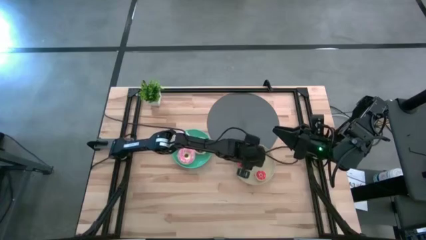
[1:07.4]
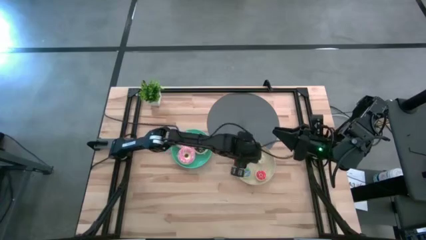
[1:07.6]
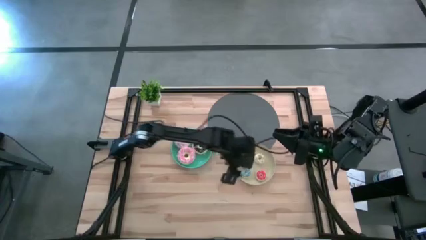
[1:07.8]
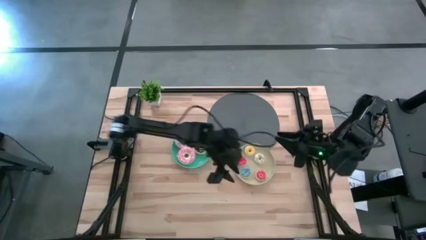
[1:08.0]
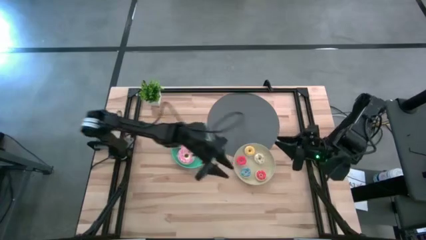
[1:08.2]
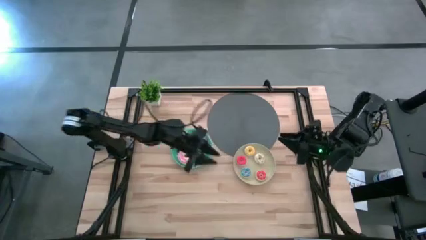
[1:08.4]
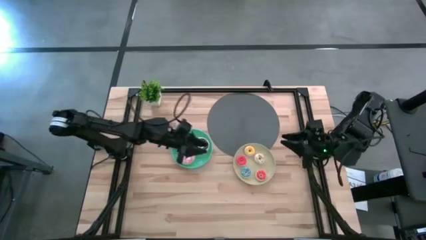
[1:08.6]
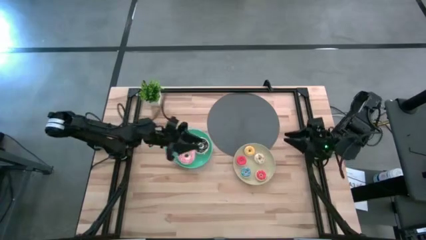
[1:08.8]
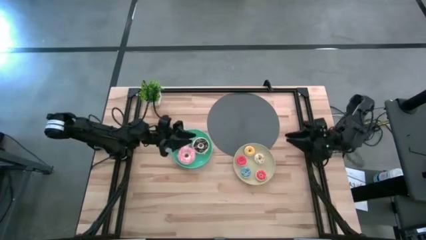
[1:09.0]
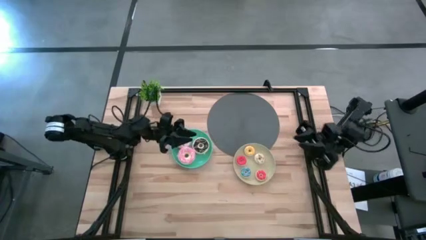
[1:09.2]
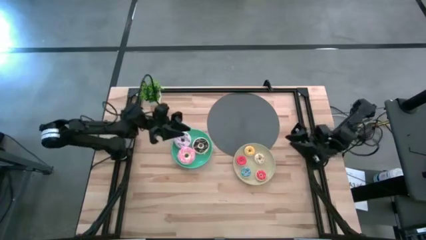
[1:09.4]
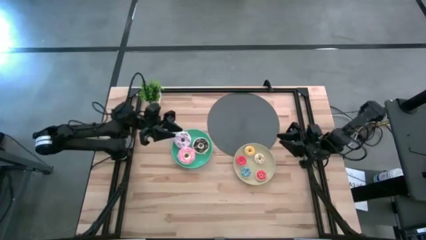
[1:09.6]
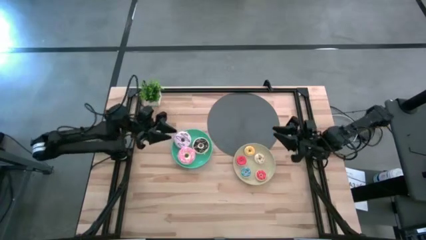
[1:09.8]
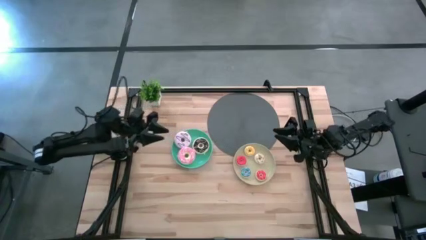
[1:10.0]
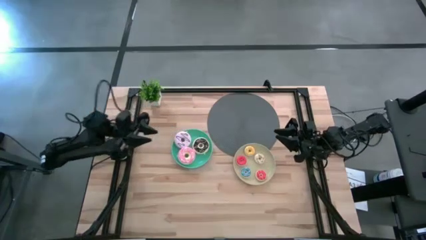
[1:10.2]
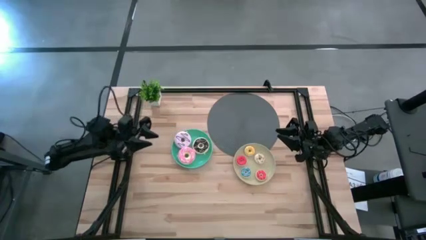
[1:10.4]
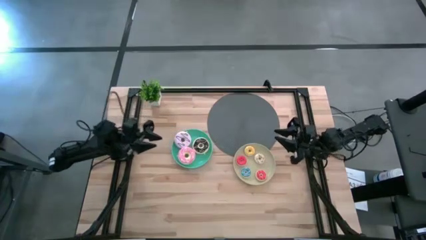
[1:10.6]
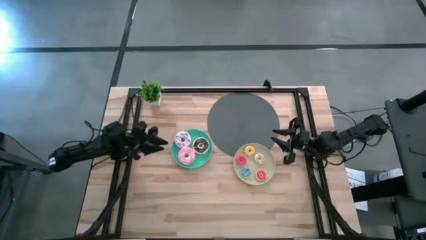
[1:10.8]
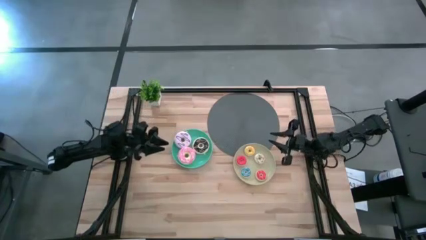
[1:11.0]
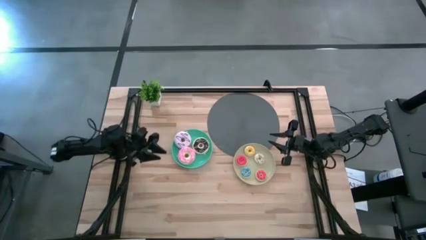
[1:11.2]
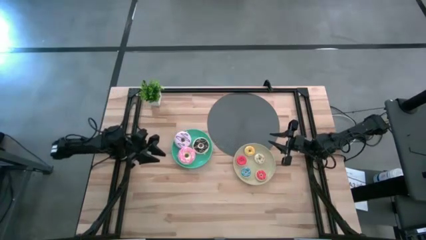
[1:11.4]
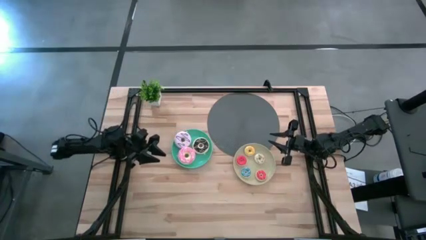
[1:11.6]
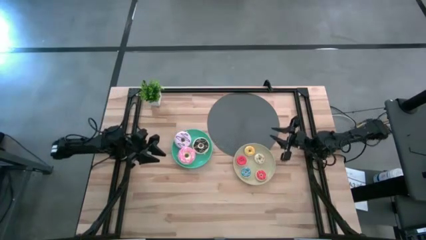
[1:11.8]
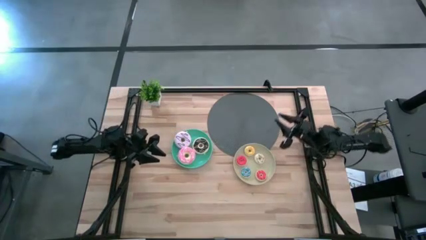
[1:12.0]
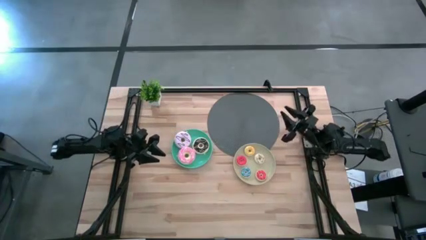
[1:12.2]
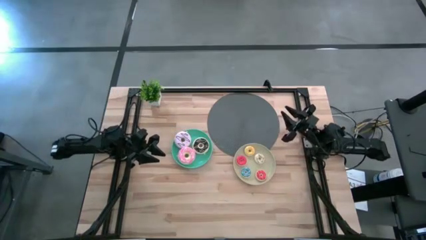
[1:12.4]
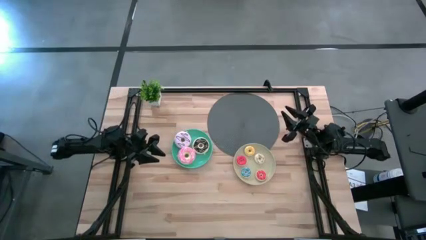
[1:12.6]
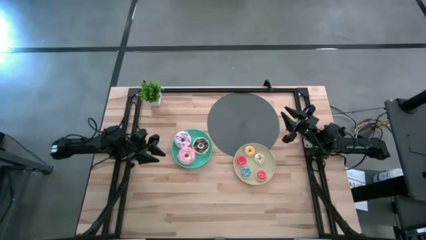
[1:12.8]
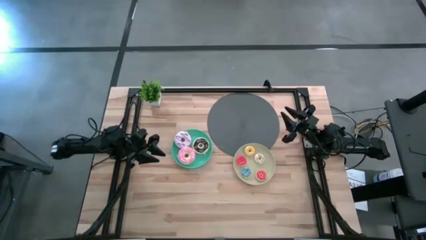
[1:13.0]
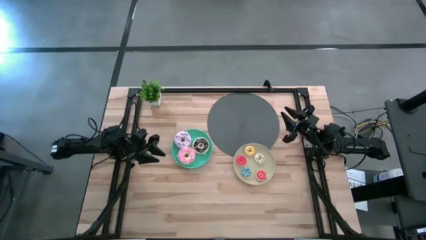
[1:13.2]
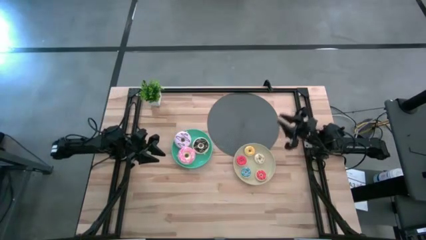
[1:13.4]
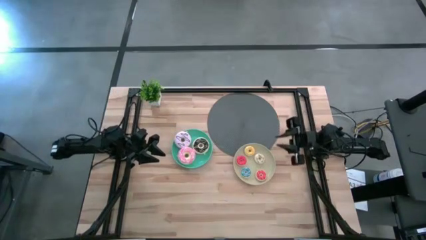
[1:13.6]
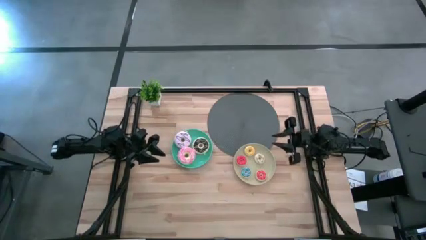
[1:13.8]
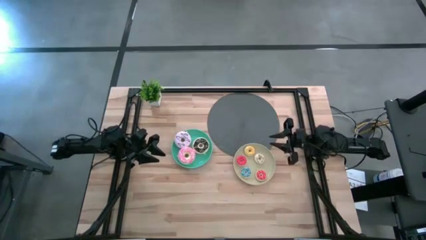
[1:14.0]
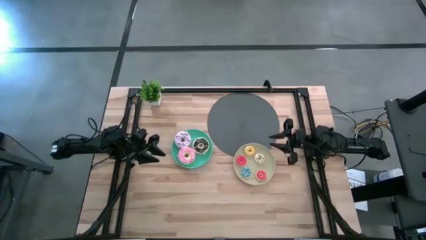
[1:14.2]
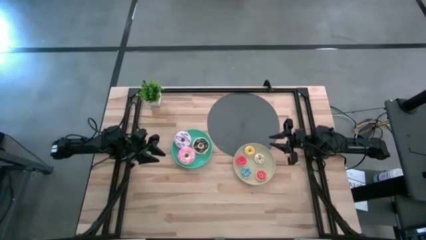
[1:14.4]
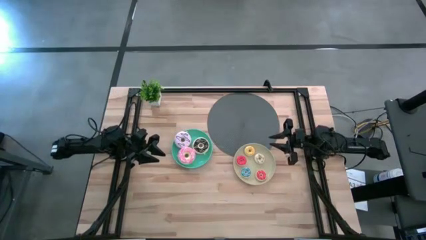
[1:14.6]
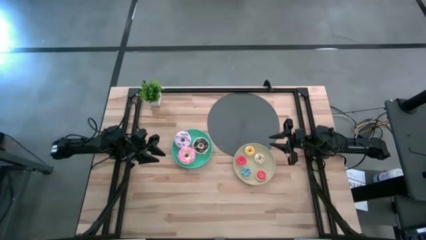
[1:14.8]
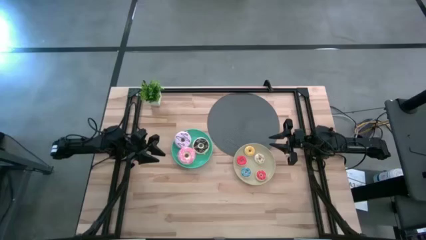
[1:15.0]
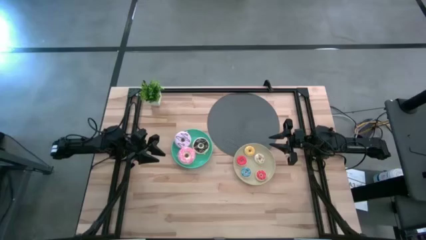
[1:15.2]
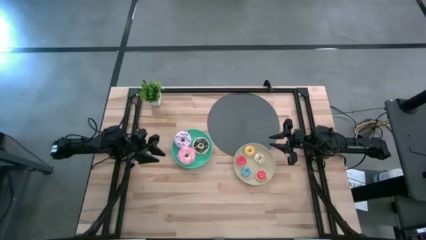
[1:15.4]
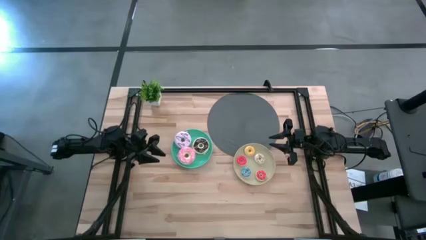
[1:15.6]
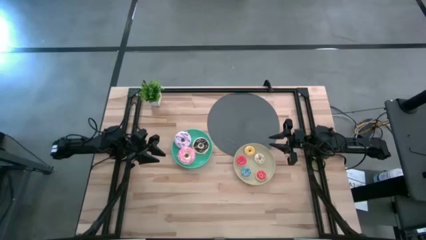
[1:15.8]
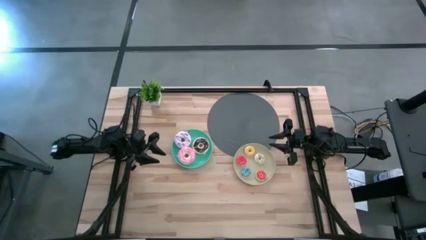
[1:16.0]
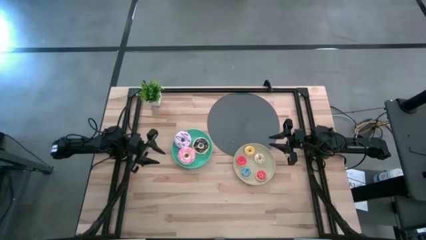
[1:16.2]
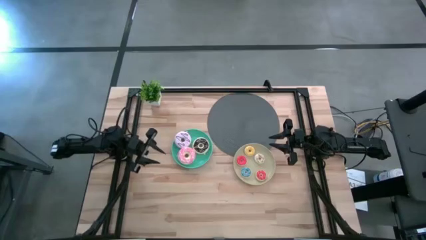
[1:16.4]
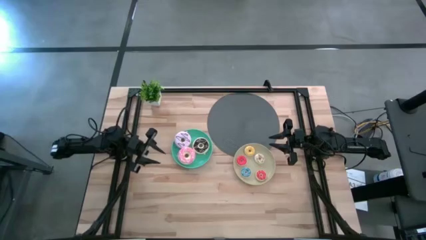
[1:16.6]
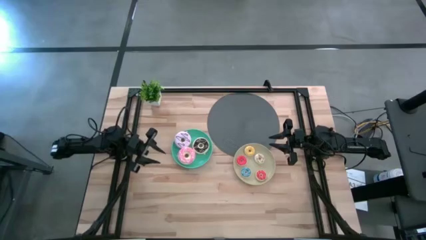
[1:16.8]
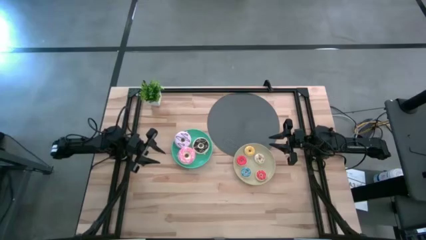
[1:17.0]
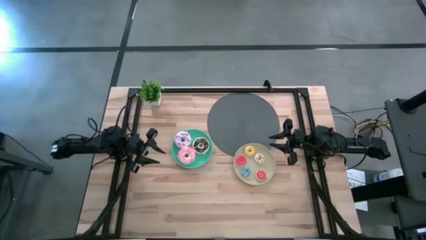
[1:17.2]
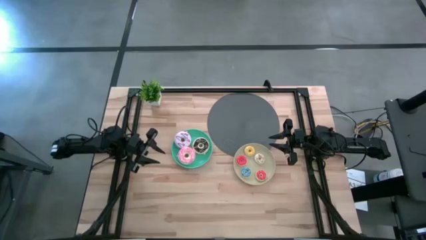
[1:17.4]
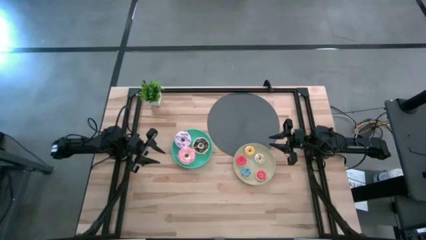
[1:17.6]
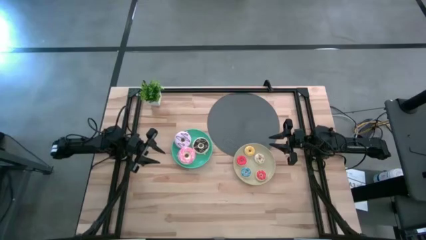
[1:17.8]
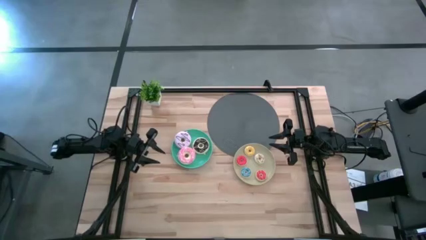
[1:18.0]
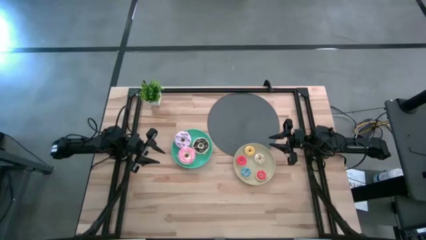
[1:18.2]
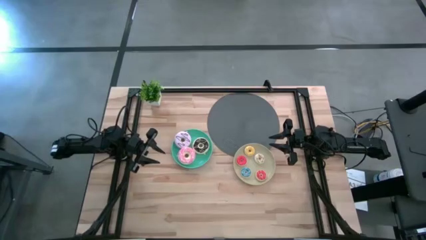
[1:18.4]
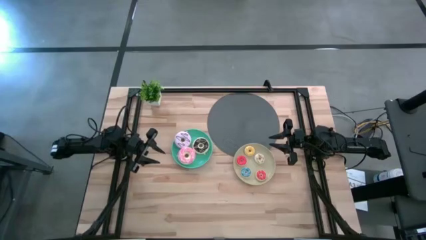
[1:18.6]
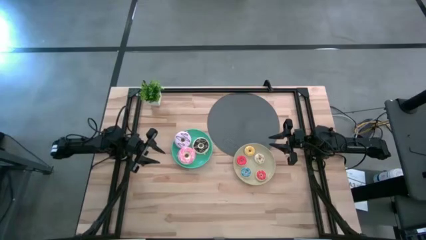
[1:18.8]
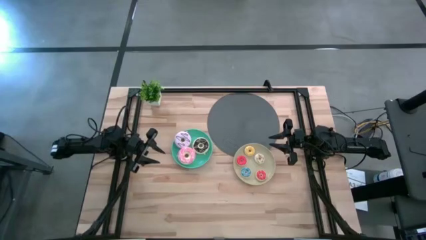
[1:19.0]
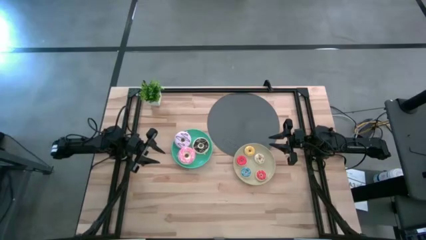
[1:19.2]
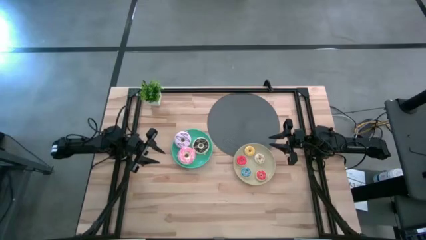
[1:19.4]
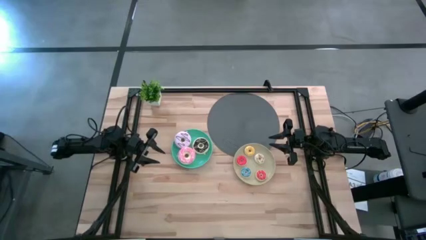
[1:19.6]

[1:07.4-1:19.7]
Task: Pick & Place donuts
Return to Home Position

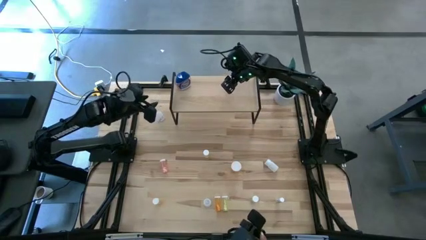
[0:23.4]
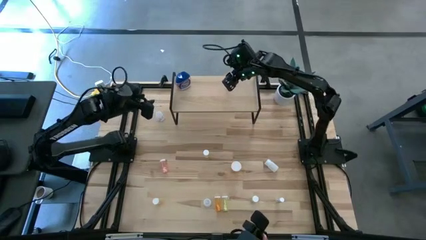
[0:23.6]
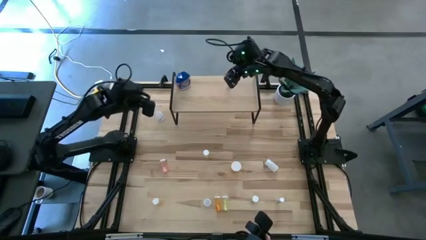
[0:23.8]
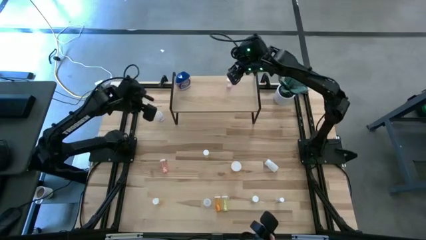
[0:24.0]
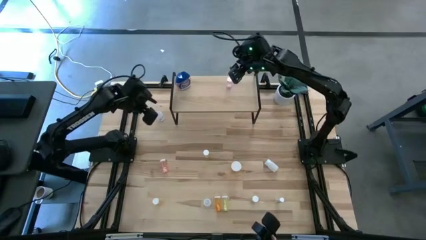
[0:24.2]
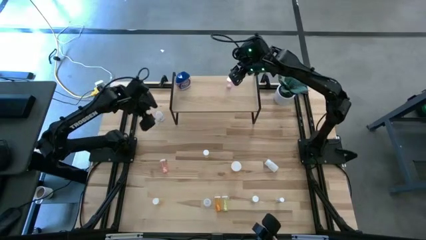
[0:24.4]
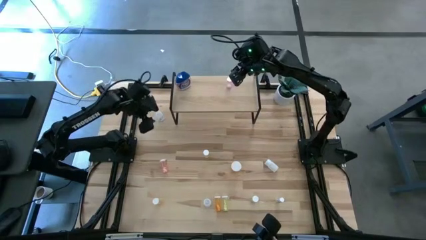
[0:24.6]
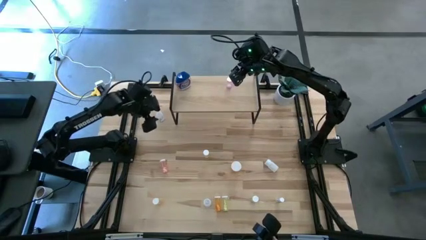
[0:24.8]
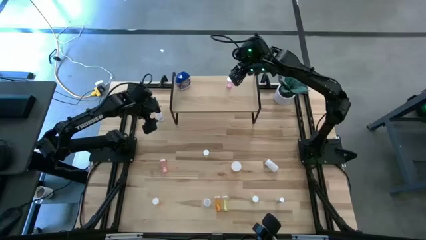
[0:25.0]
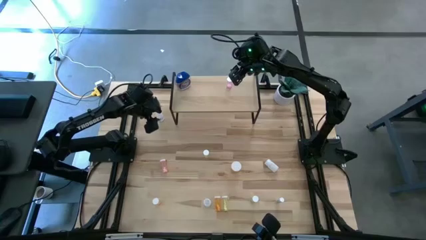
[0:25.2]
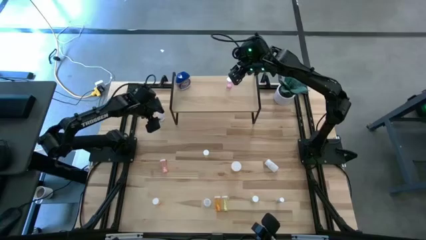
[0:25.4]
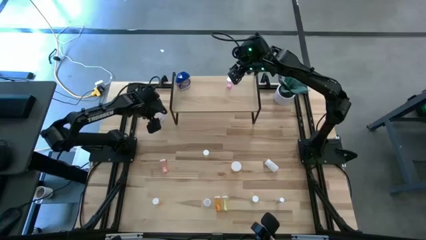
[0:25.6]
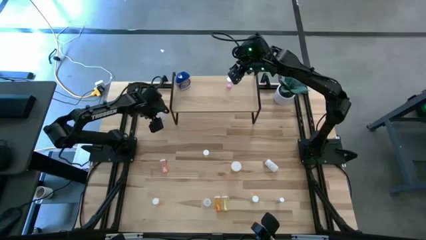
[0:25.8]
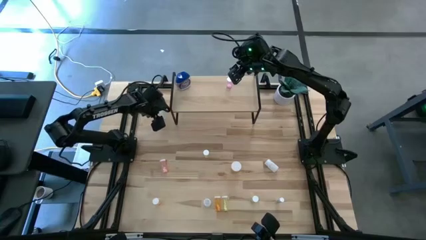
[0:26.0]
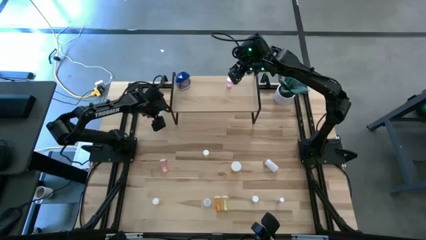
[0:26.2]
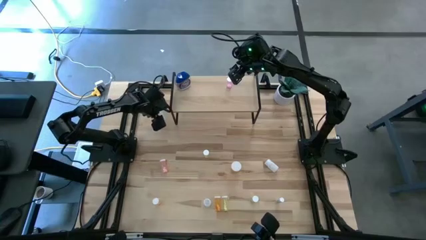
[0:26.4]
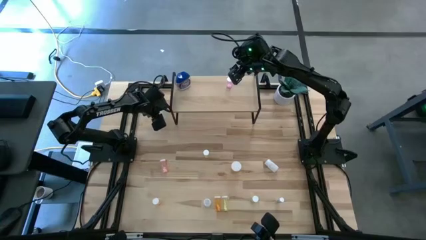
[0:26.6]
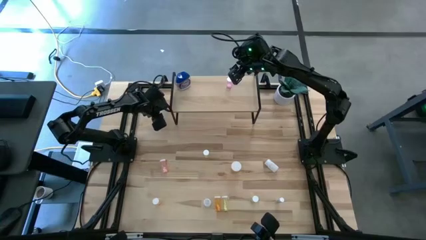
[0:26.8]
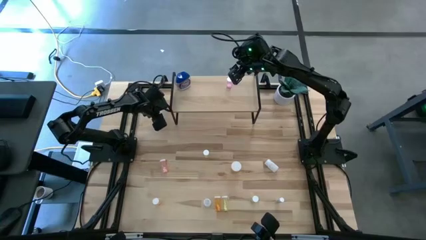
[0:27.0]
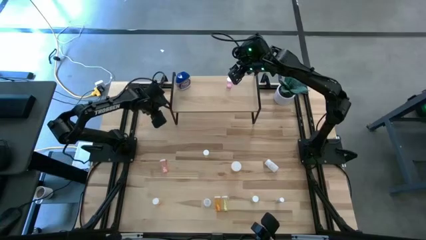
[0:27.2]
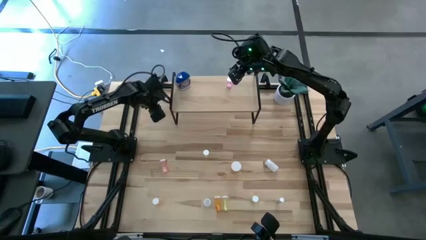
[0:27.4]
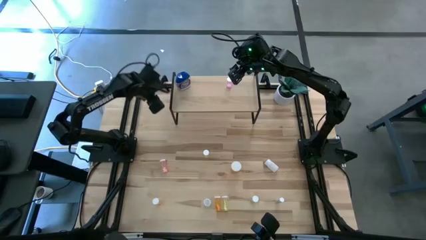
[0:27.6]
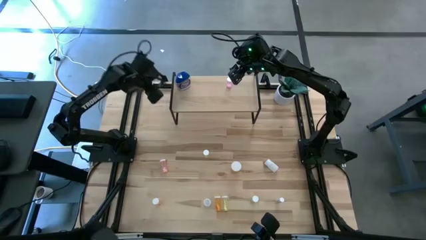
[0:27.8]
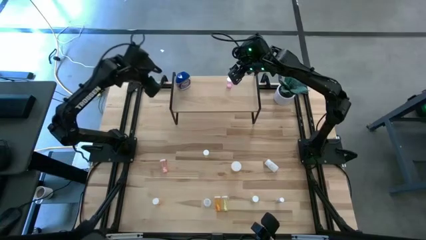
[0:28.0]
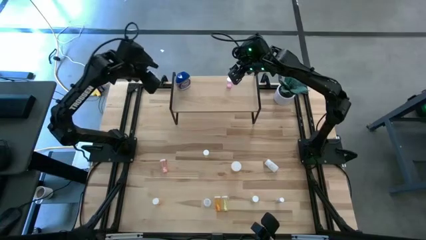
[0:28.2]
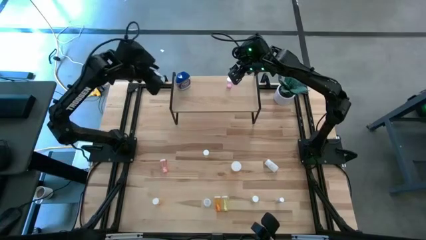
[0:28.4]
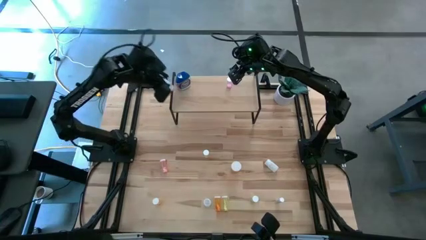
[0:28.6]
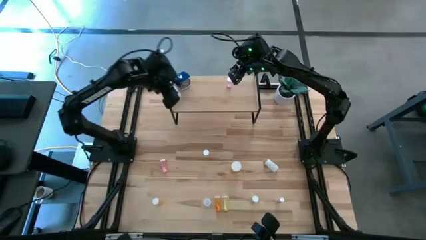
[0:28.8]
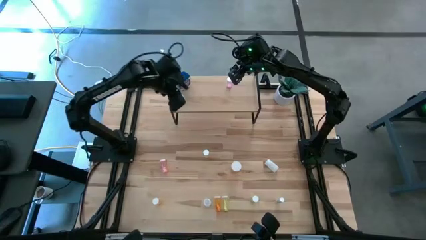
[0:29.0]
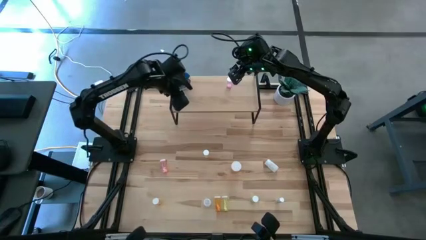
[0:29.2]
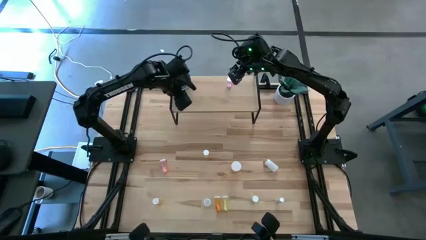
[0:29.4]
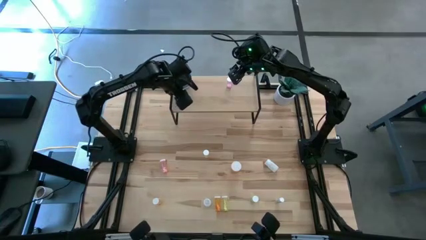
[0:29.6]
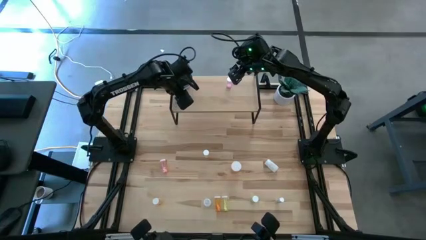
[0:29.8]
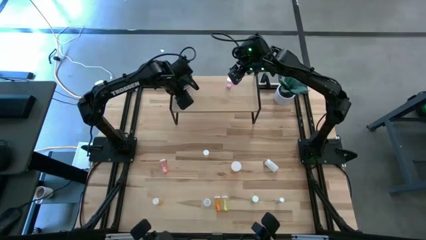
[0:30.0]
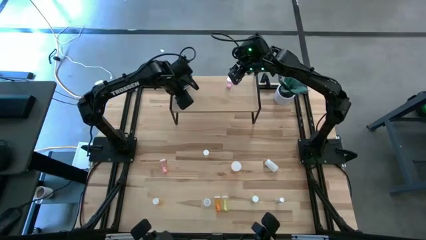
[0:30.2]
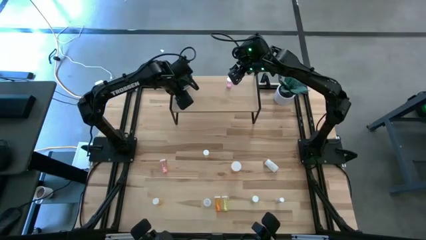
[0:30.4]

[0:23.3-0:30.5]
Task: Pick and place medicine bottles onto shelf by color
Put the transparent pill bottle on the shelf
